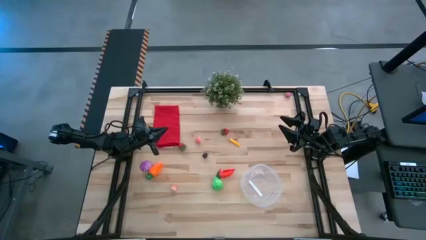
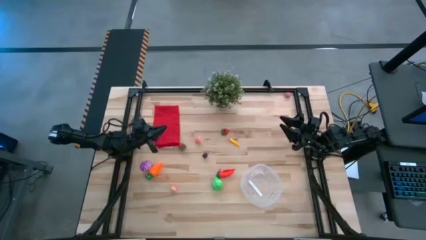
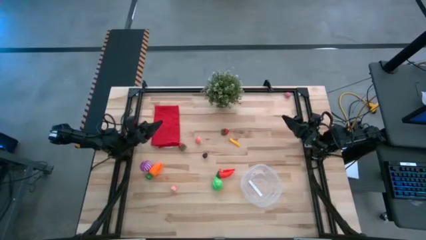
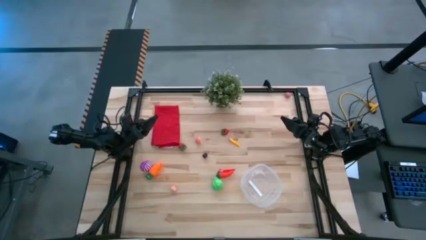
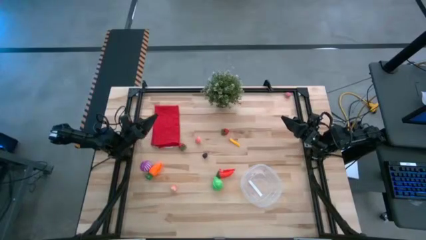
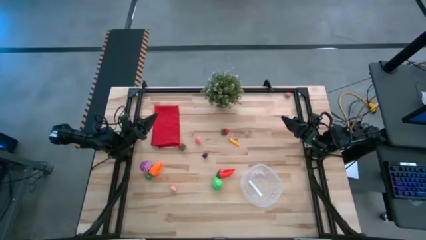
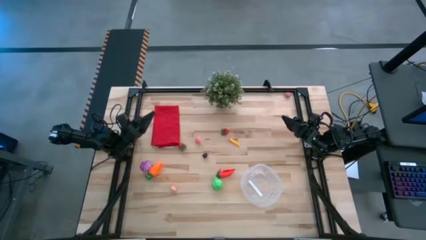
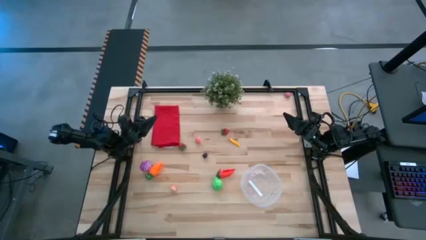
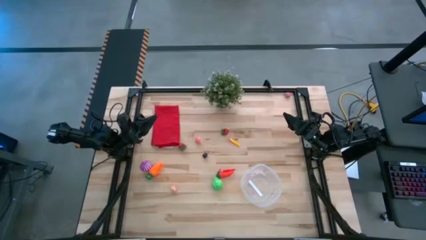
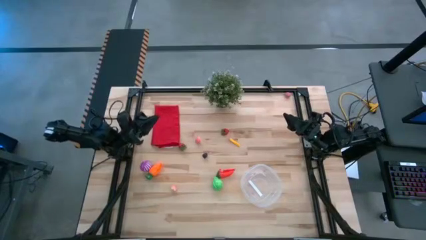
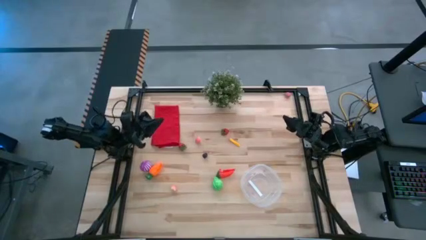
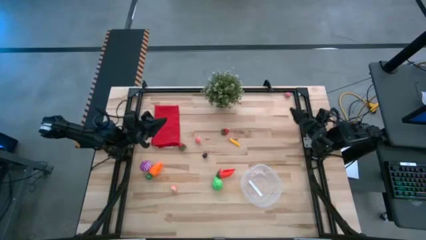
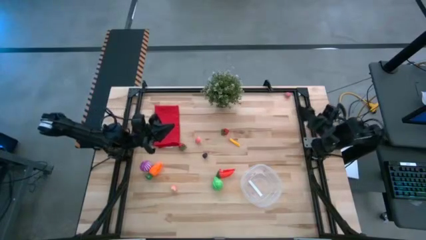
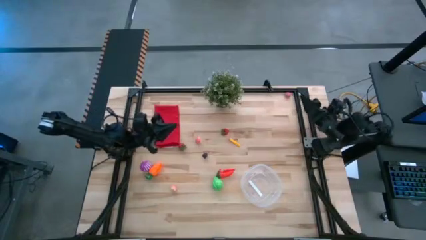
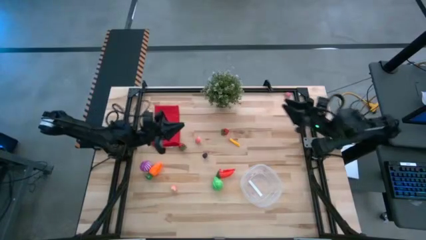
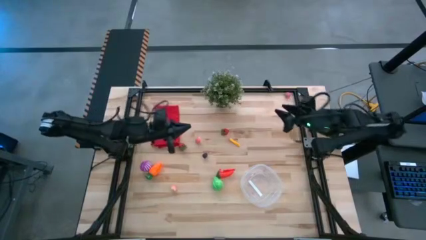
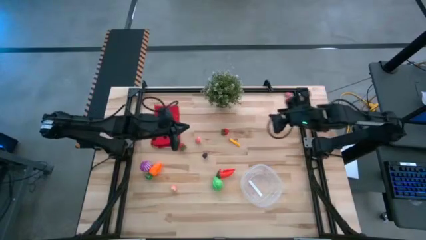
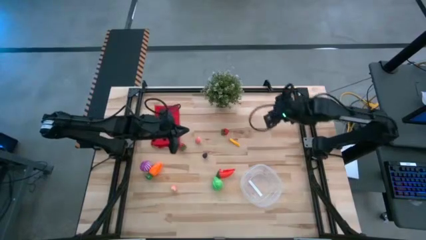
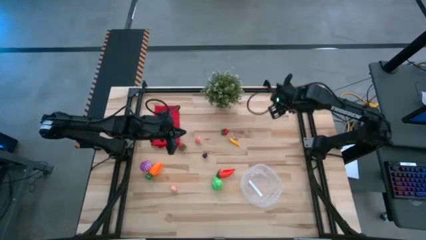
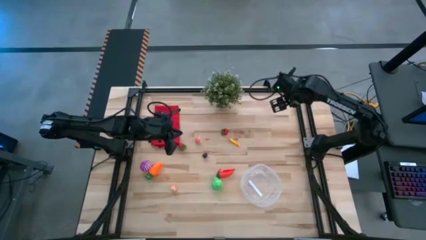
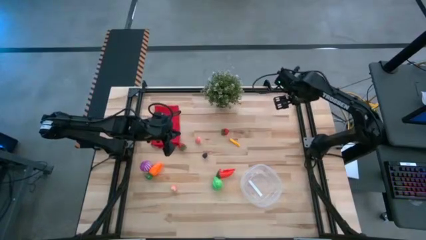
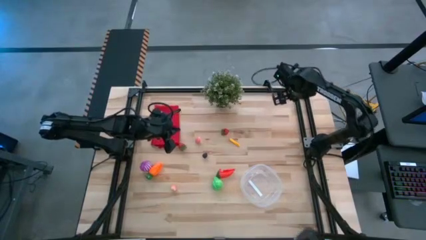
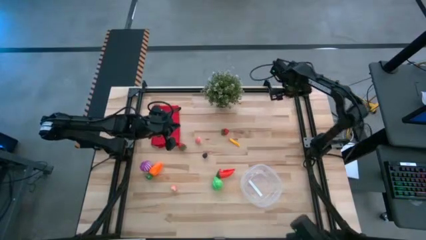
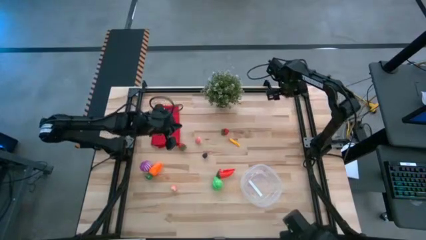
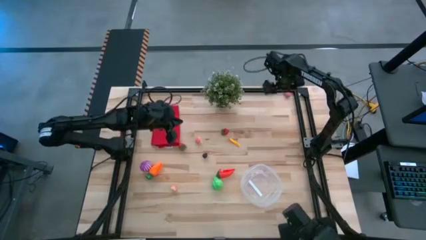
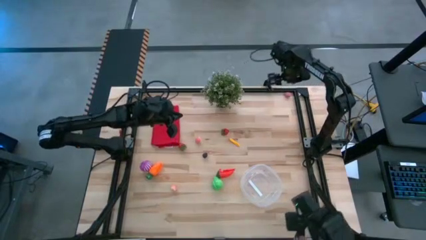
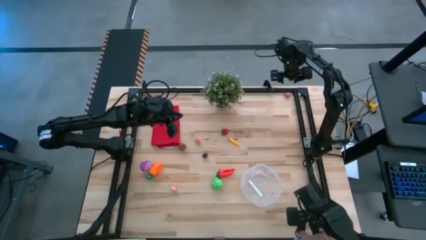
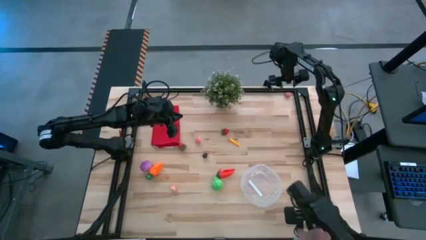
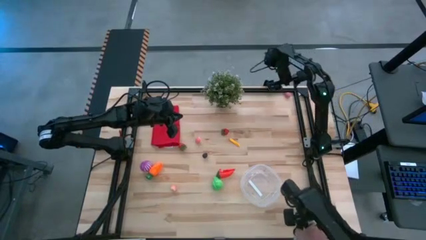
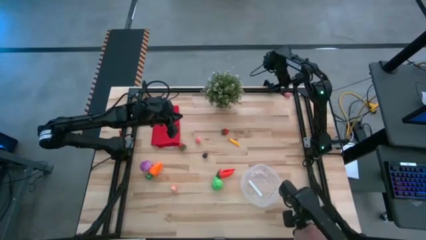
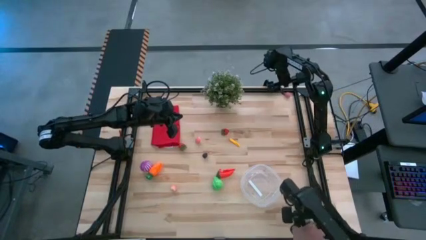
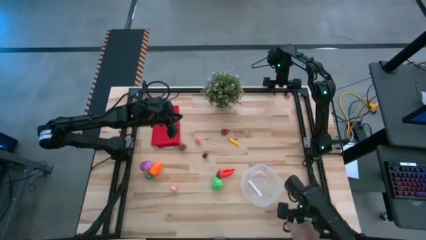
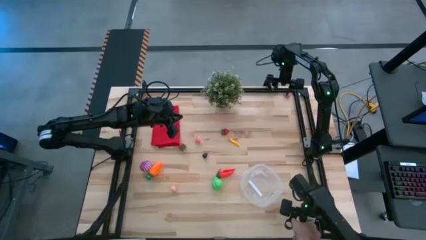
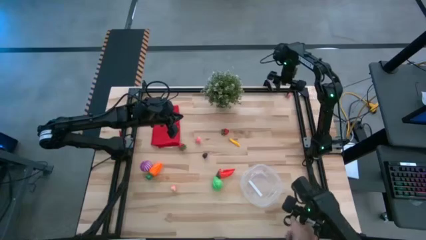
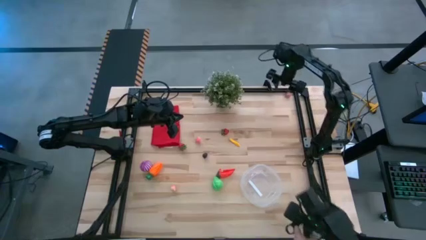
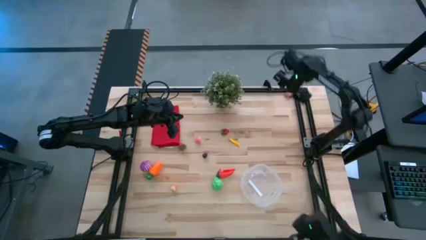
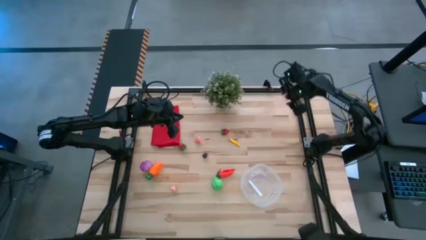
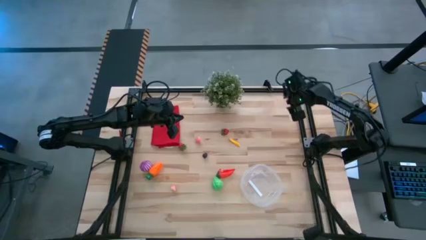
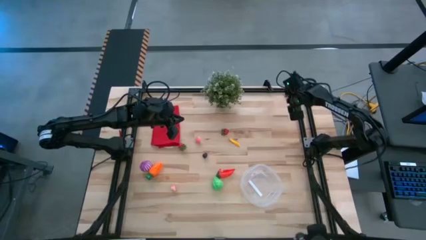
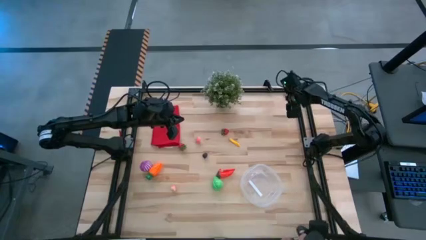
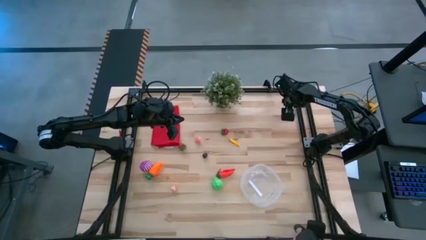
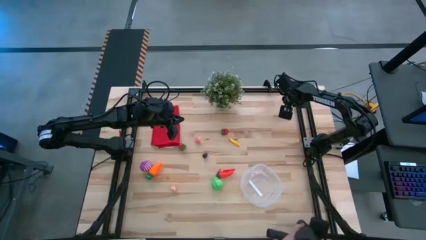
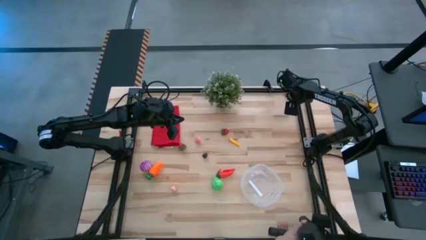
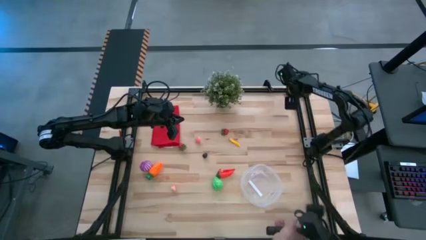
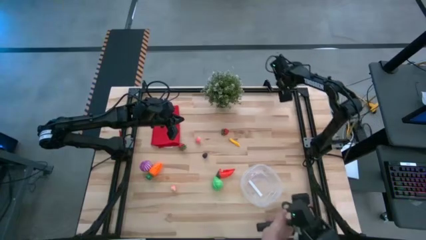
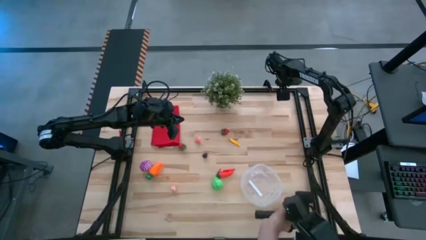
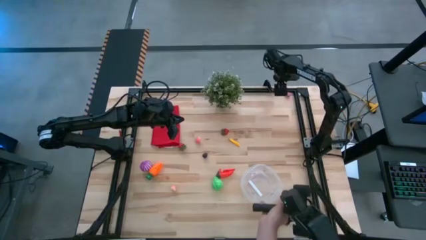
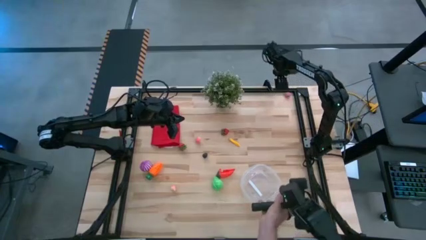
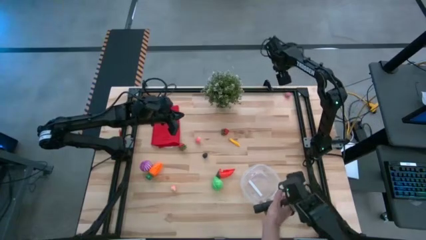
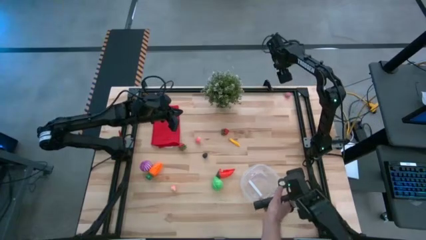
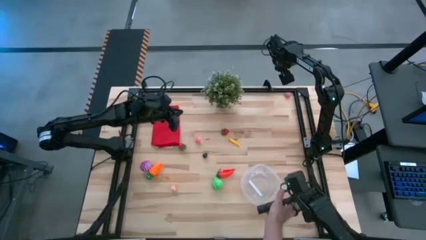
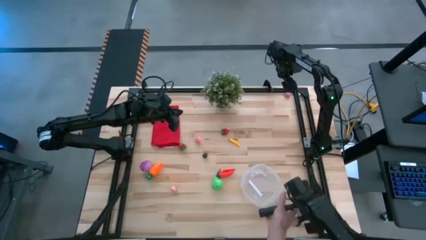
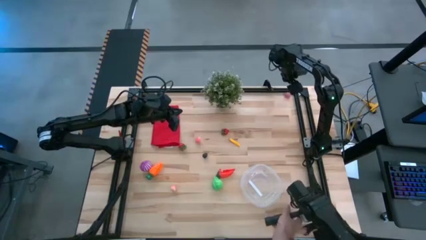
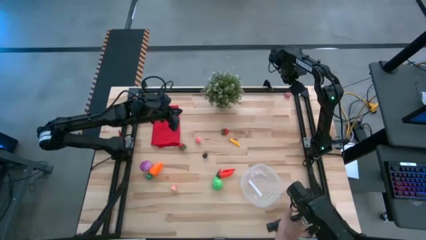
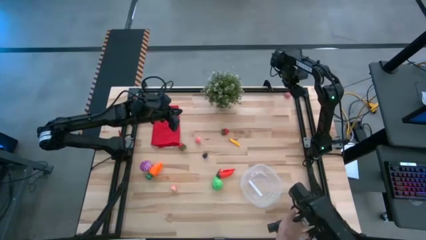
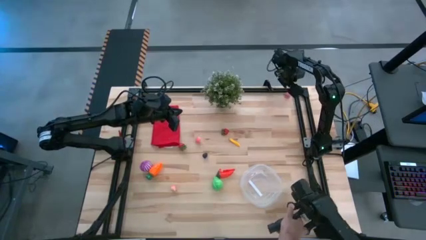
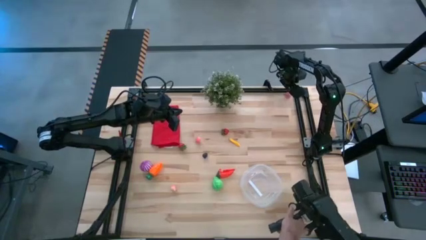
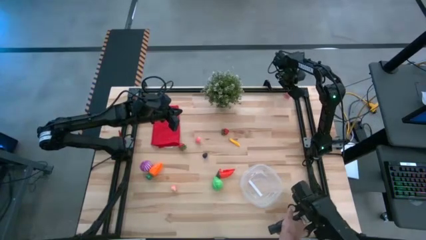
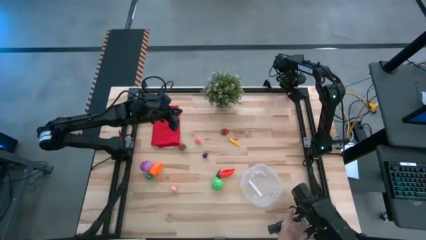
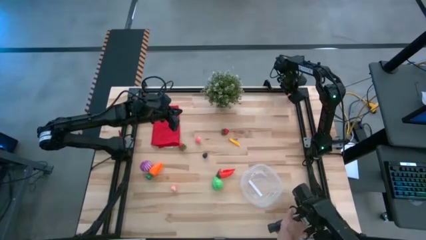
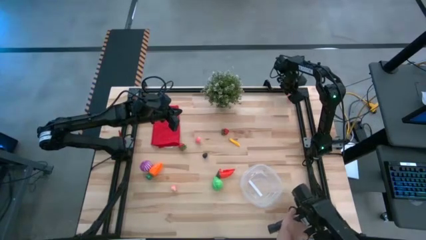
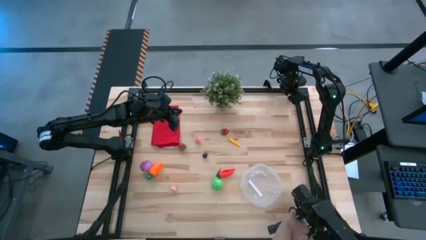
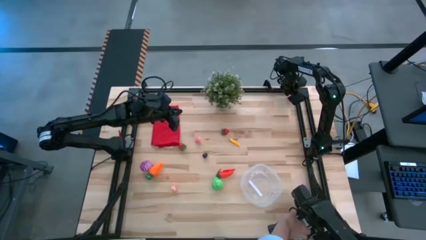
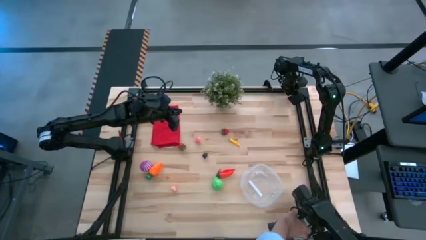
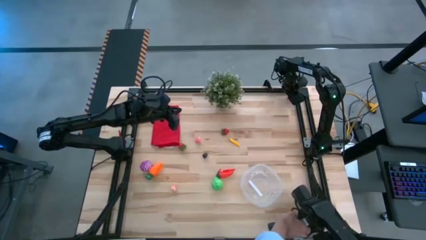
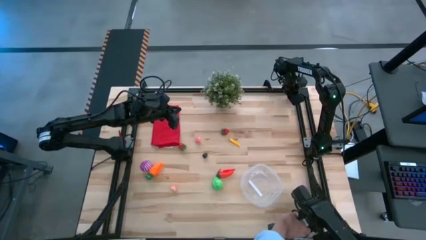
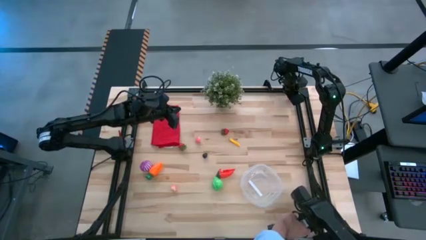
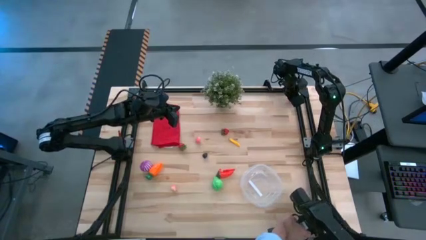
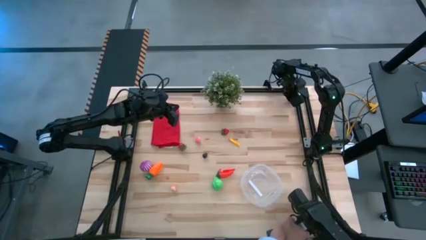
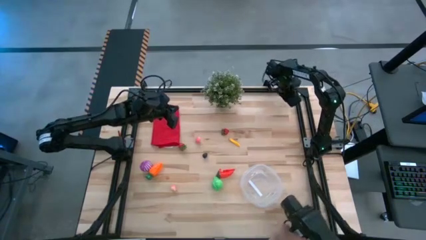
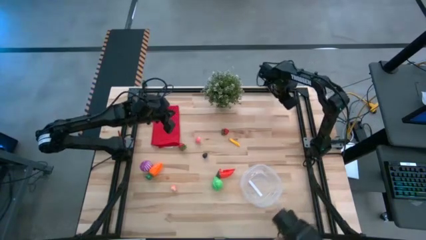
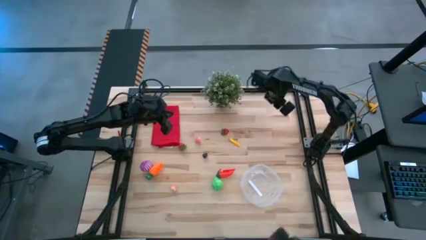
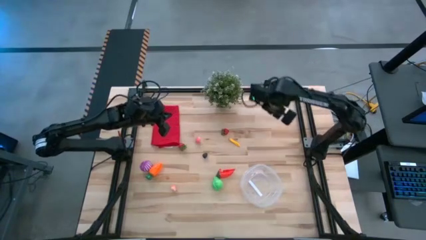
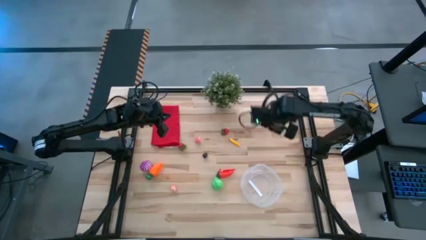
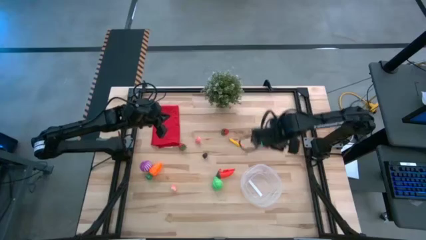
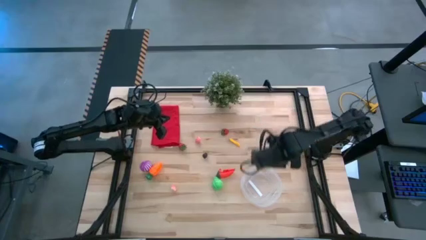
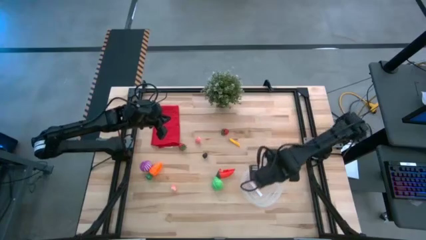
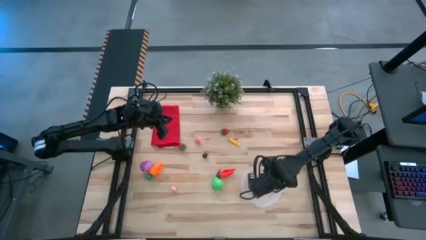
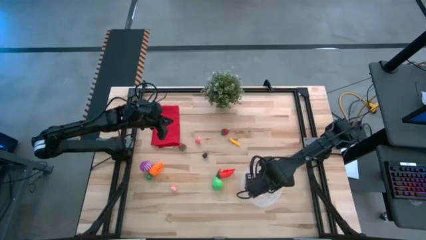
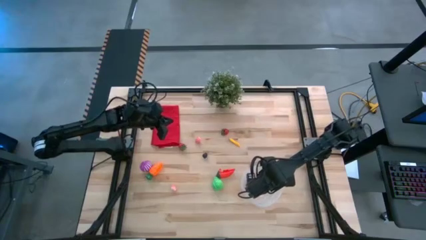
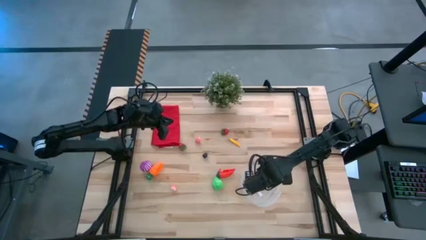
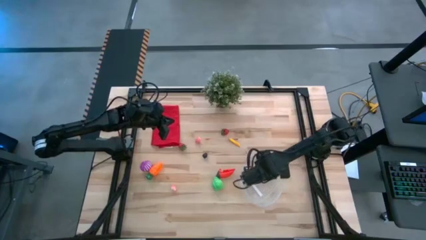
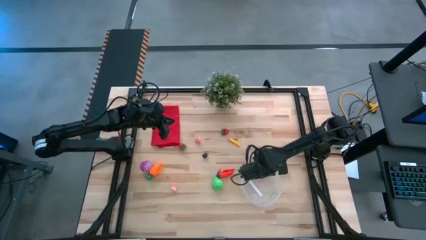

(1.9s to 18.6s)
Task: Pick and placing Produce into tupperware
Put the top pink peach into the transparent bin
